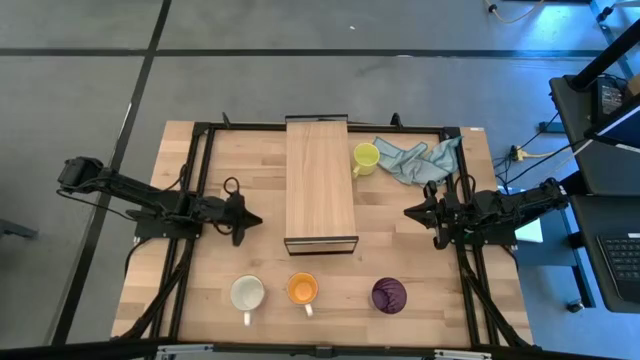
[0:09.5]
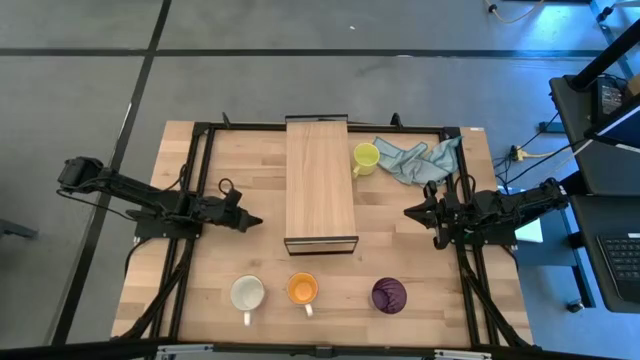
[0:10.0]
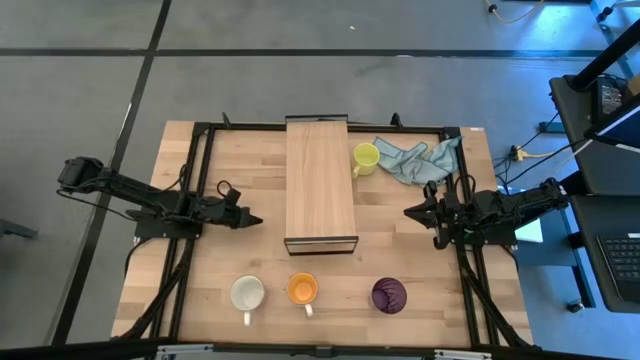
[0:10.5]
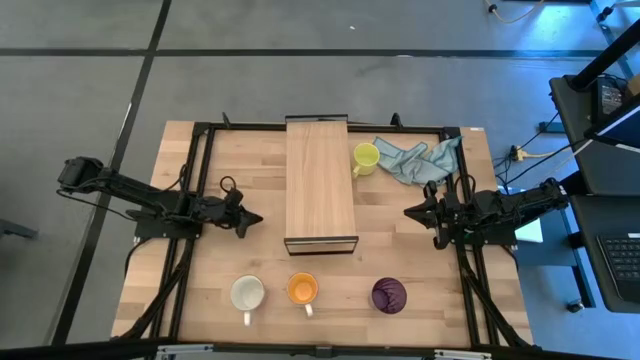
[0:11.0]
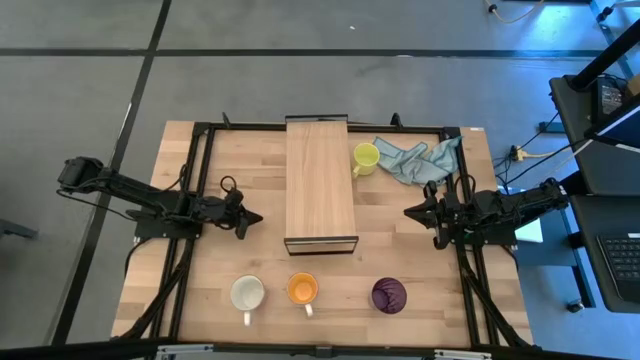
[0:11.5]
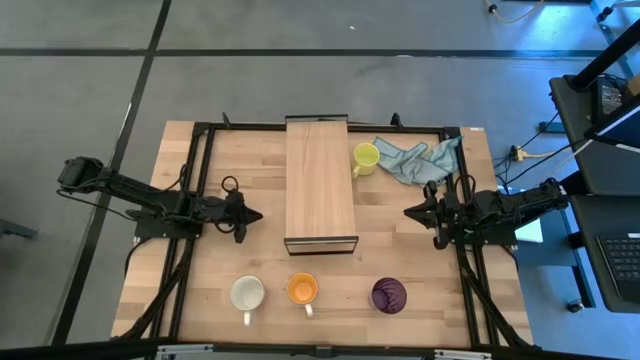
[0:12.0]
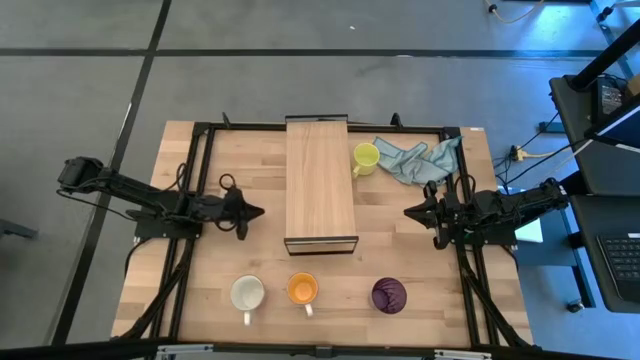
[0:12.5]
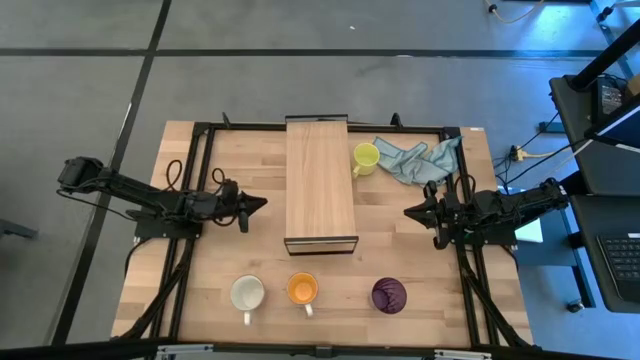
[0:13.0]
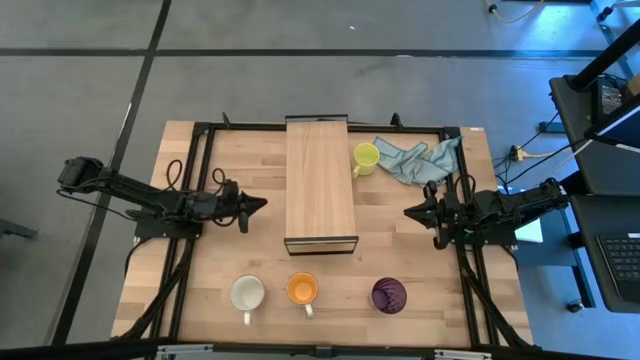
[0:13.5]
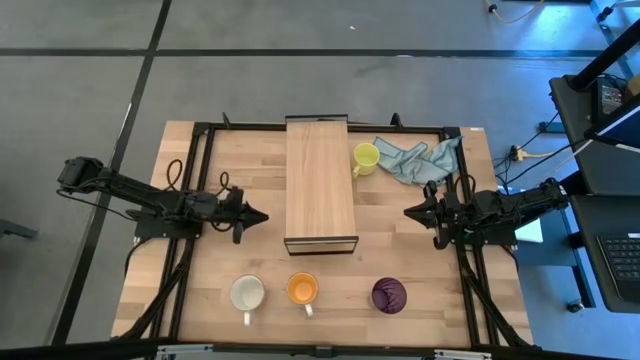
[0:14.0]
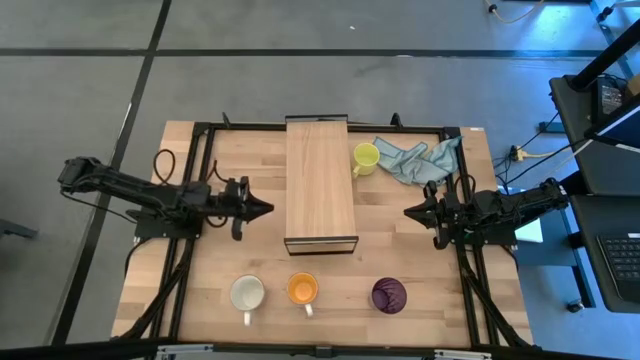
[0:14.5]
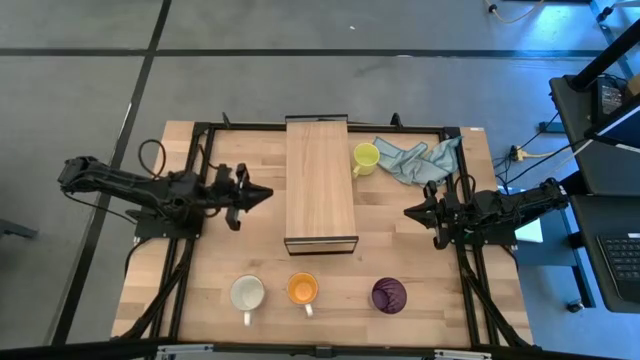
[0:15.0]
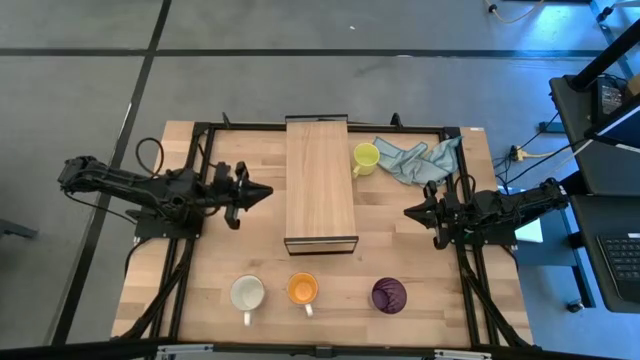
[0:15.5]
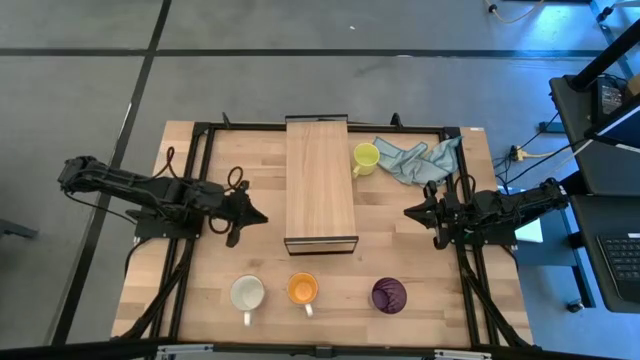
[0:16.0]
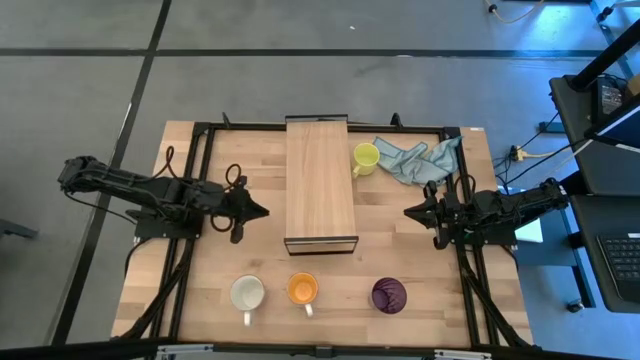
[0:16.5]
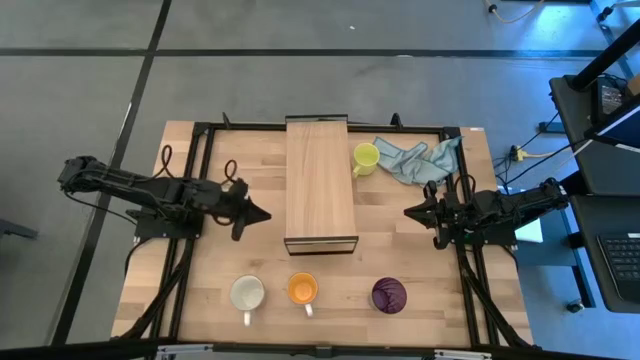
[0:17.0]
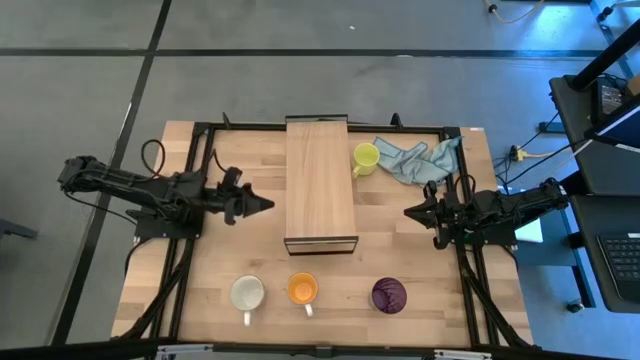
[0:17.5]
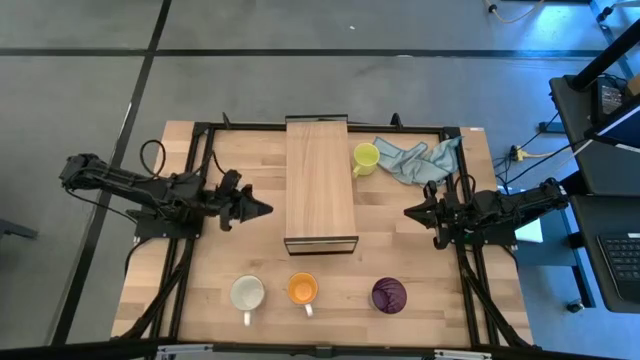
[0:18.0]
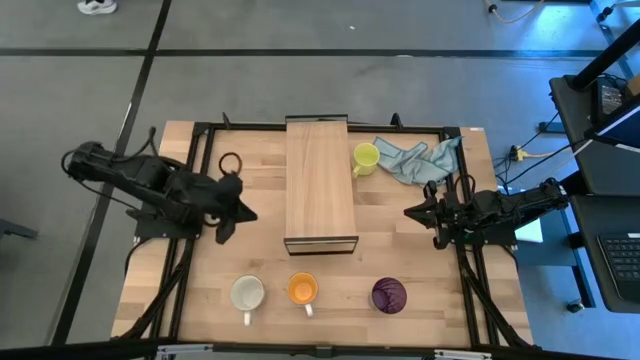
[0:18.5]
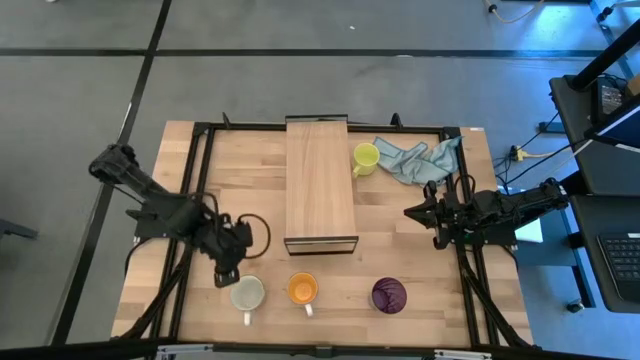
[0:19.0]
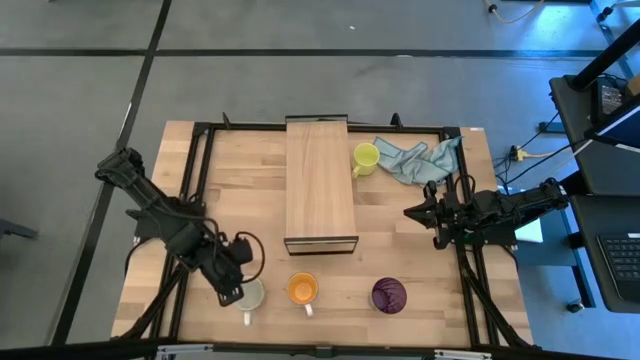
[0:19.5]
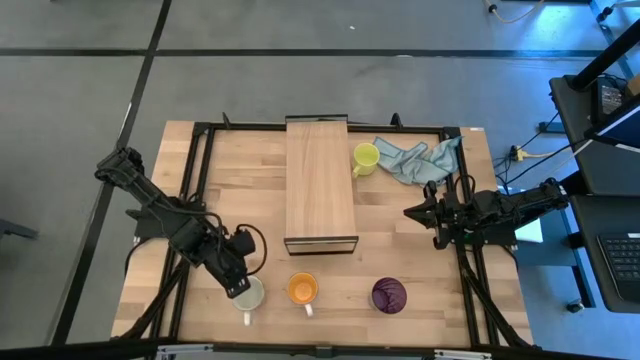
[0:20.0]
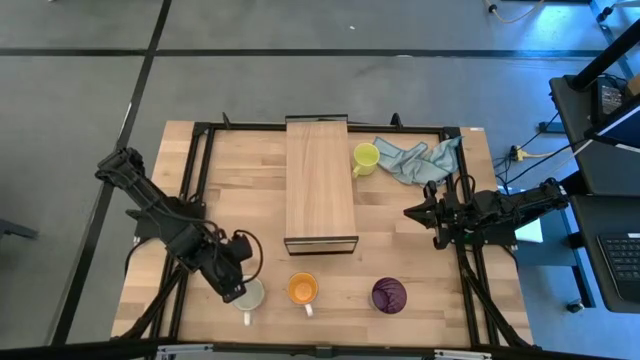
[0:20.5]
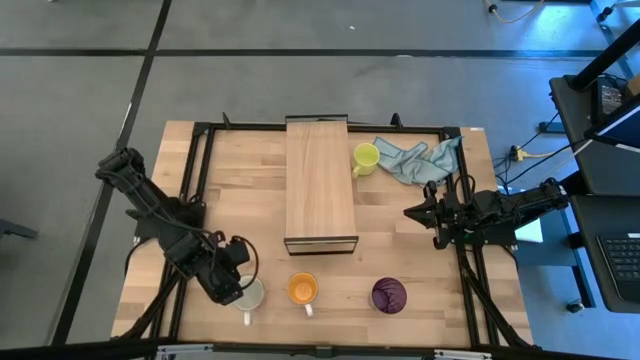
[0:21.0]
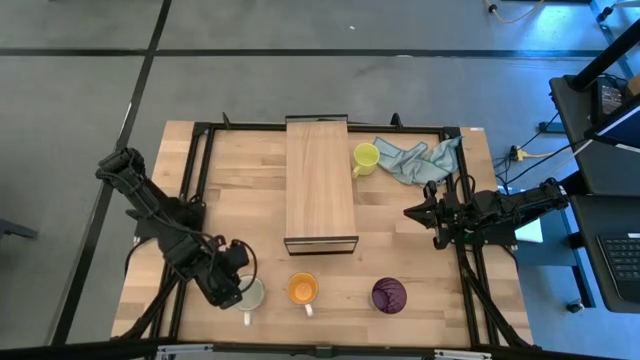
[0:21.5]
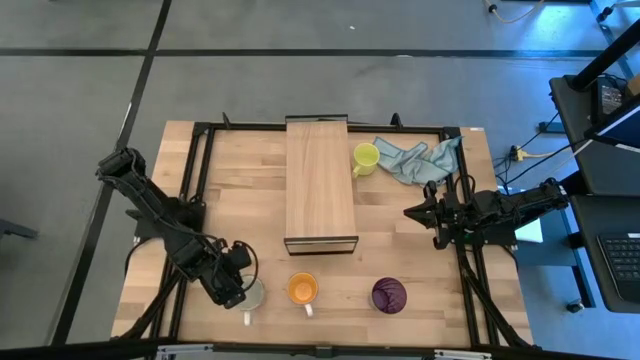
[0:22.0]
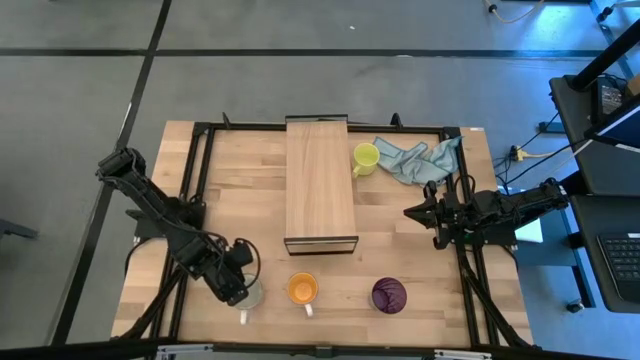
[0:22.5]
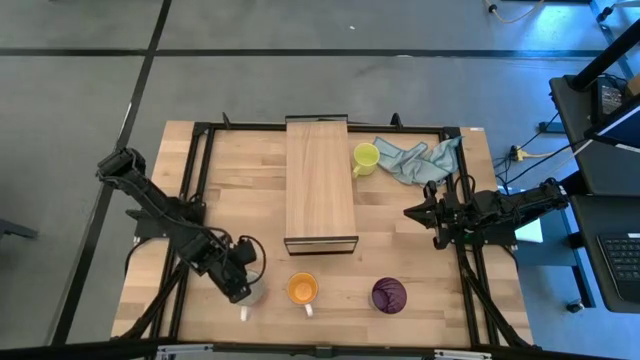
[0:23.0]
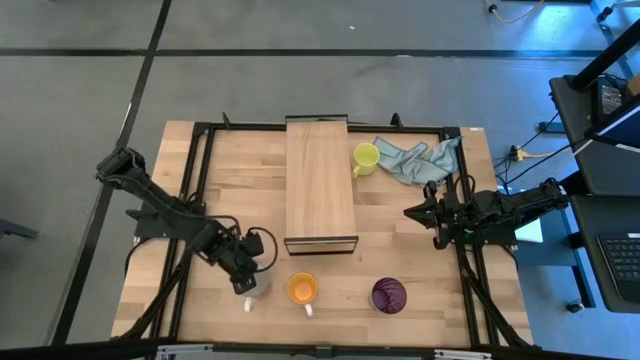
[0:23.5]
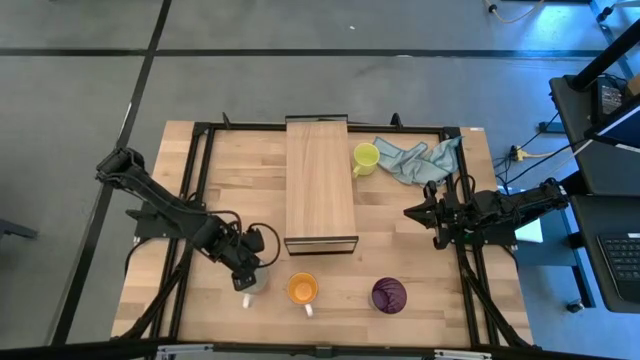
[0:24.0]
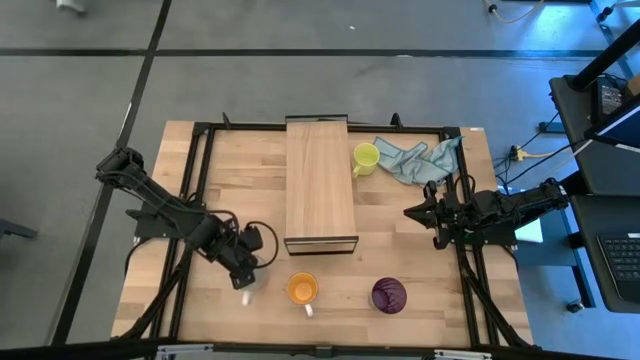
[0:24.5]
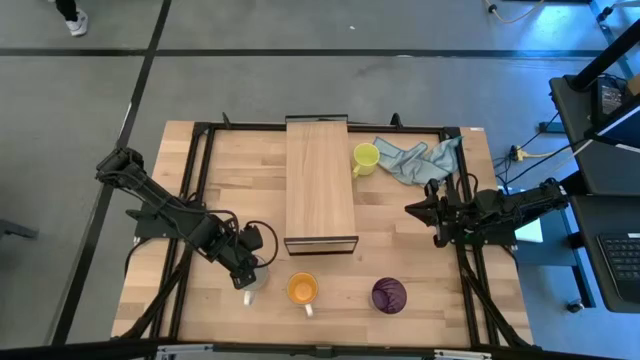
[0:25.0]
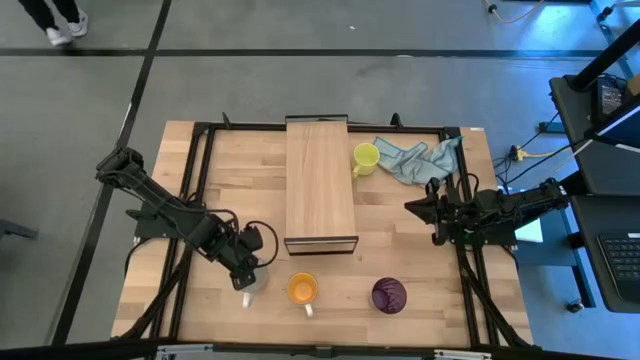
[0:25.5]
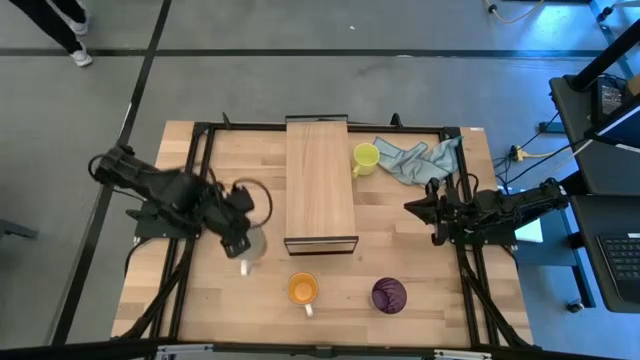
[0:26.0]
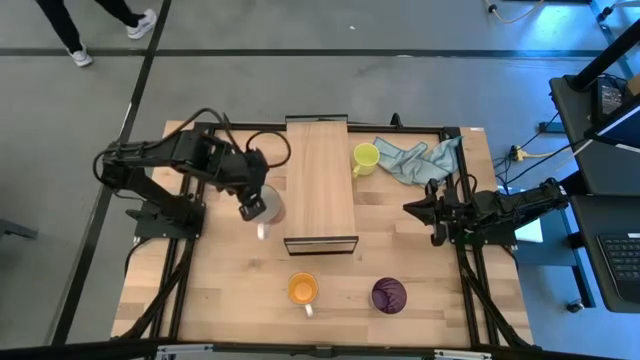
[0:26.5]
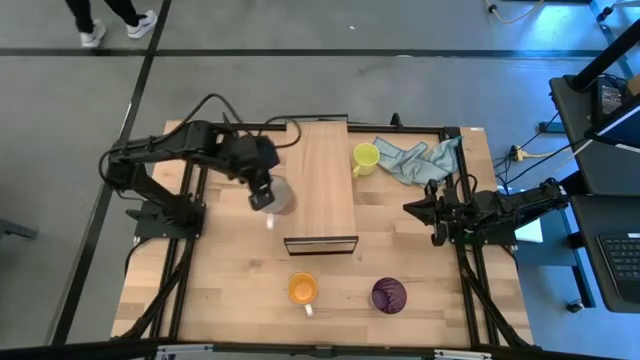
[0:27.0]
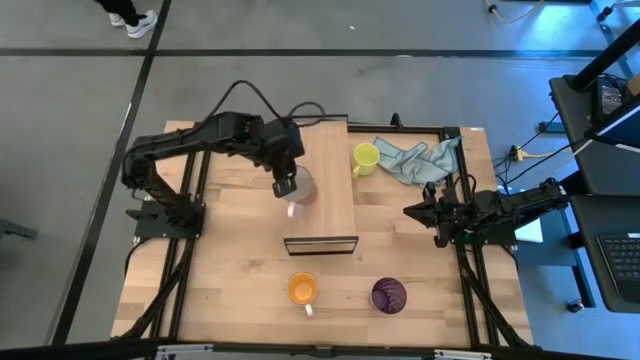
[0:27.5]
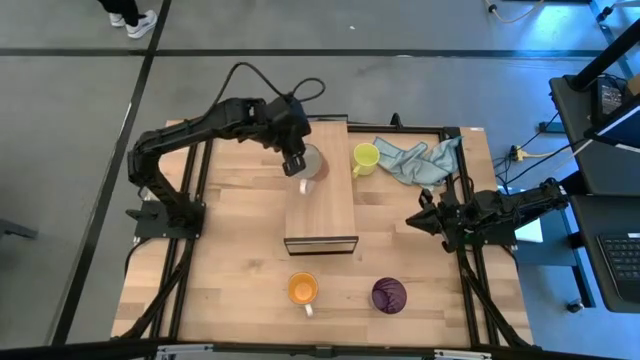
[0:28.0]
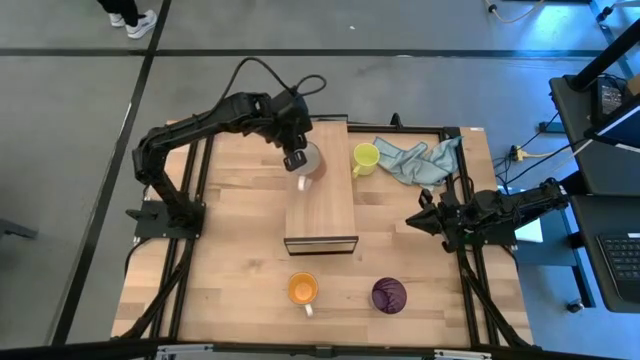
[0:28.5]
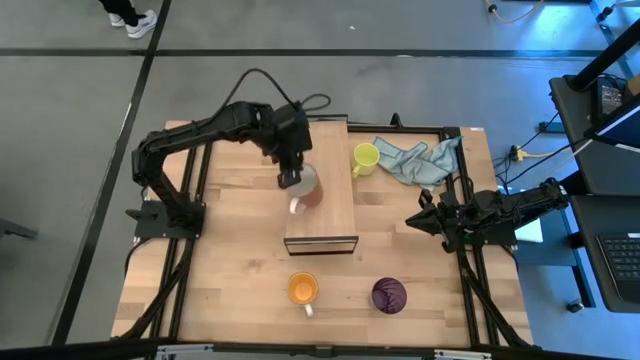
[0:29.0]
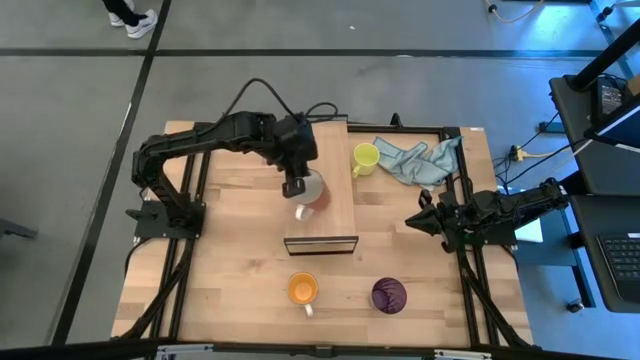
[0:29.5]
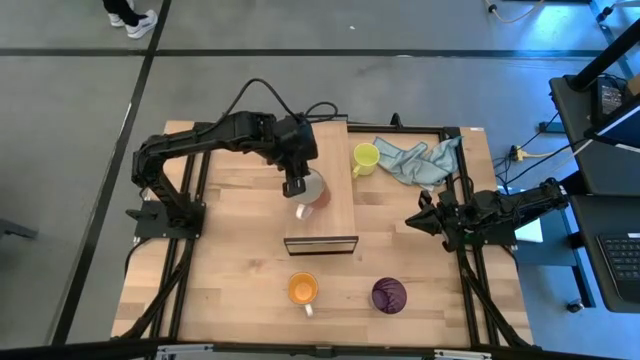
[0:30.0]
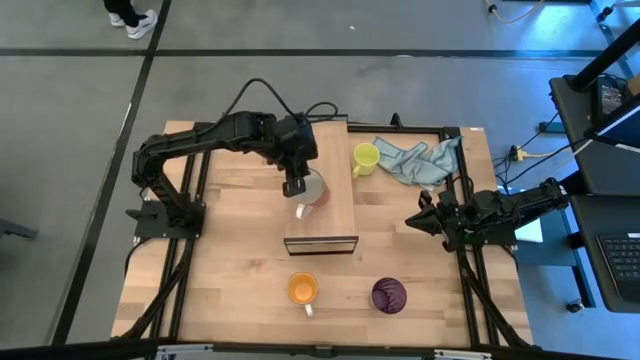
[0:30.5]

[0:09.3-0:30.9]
Task: Stack small to large cups/mugs on shelf
Put the orange mug on the shelf
